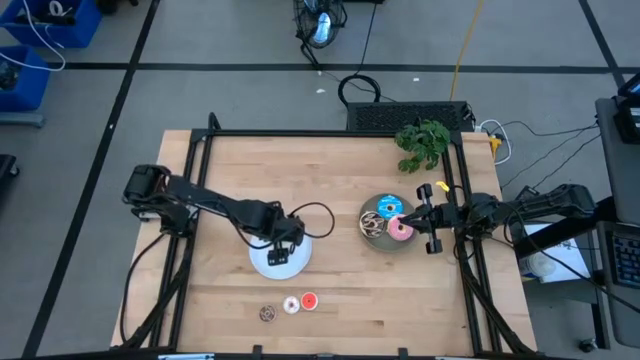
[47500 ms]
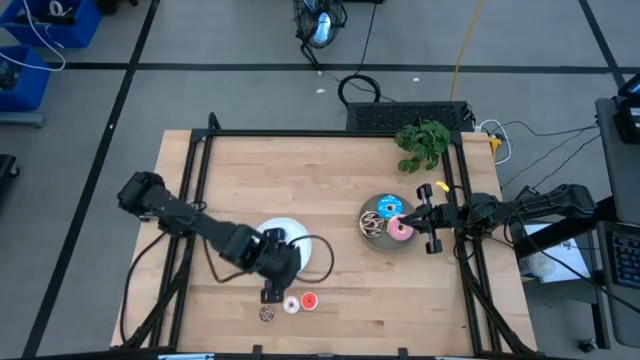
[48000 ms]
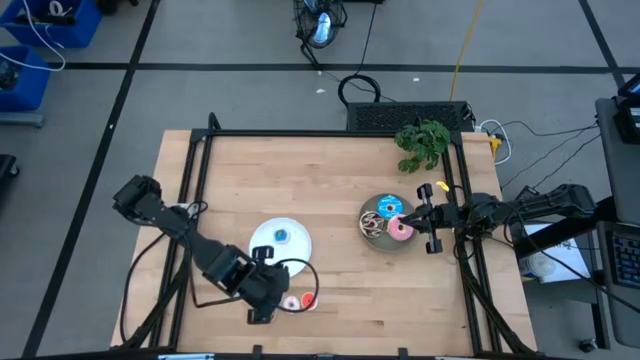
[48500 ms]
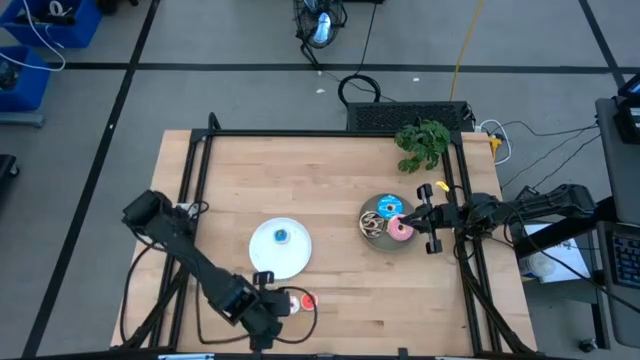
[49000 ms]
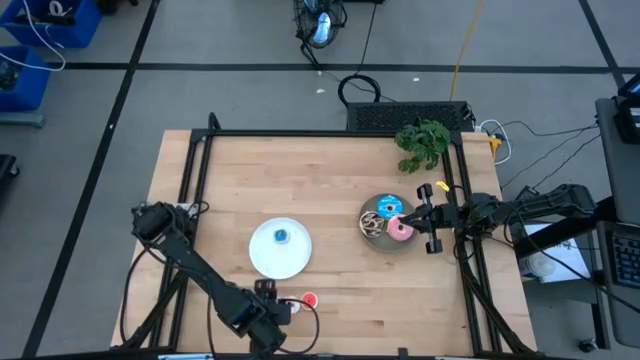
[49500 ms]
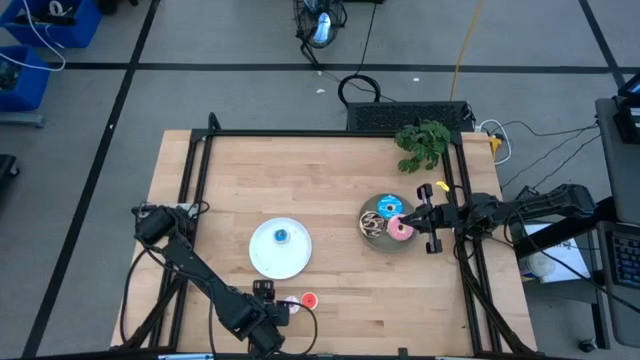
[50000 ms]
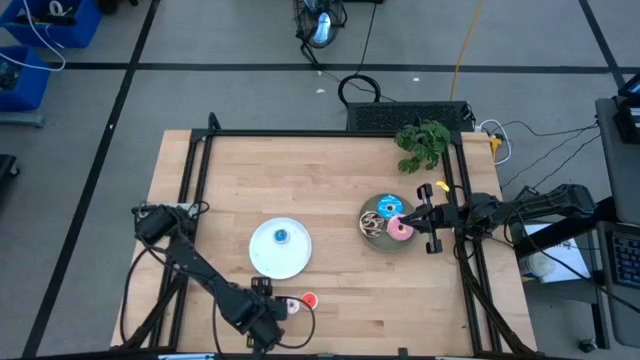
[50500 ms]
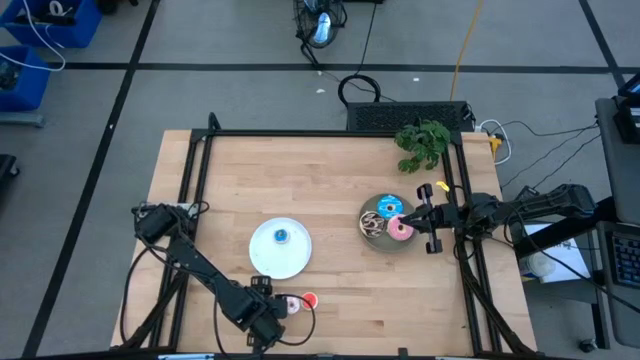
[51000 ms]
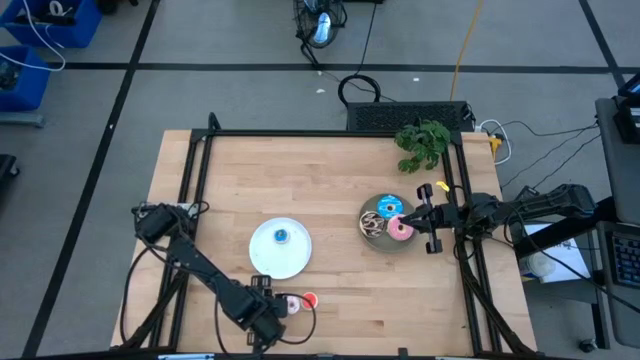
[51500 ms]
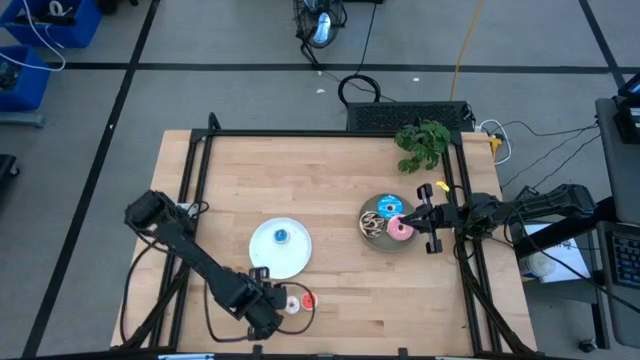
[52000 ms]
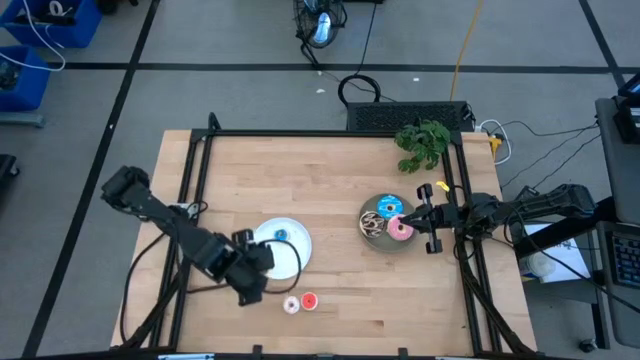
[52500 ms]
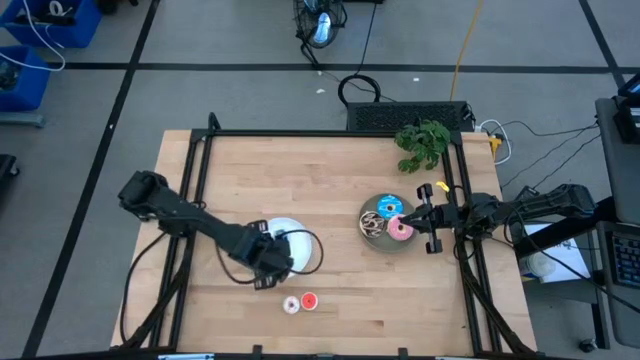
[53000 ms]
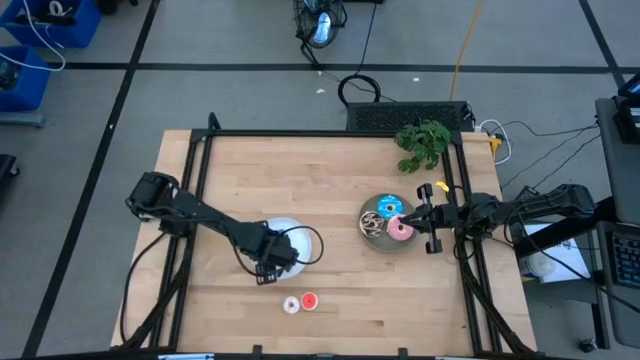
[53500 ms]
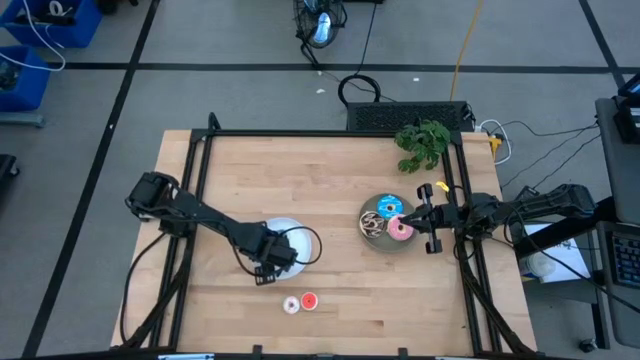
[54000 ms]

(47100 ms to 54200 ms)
Task: Pick & Place donuts
Put the small brown donut on the white plate

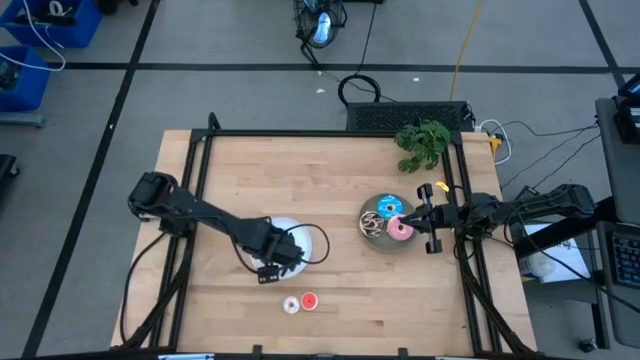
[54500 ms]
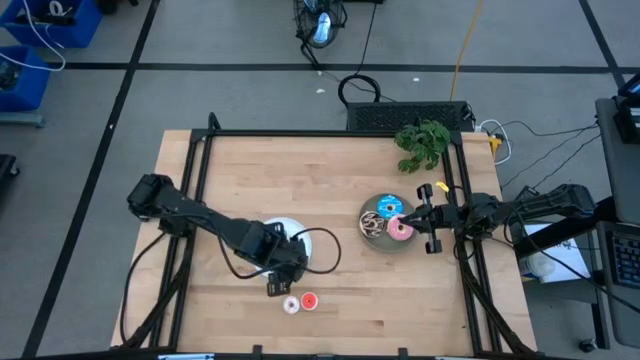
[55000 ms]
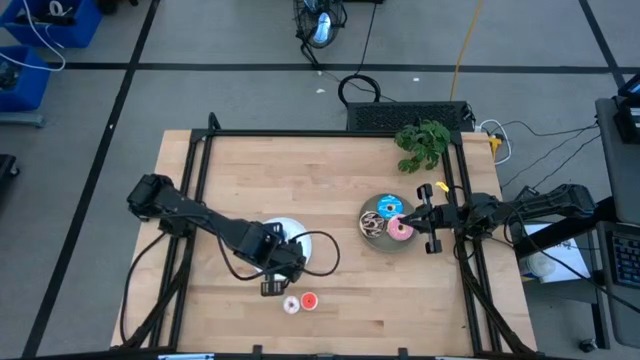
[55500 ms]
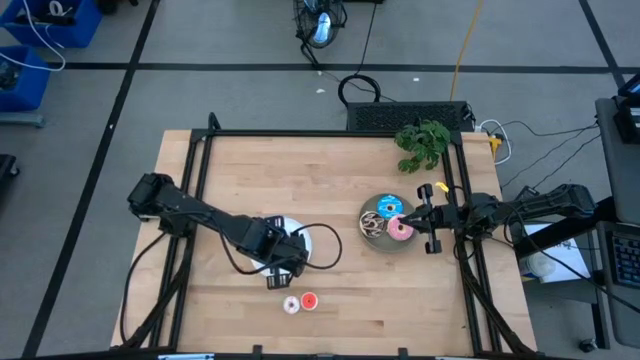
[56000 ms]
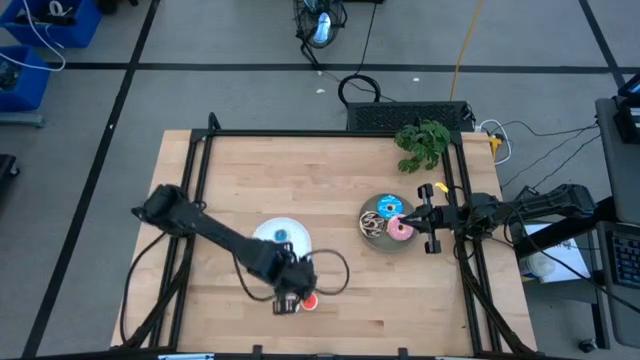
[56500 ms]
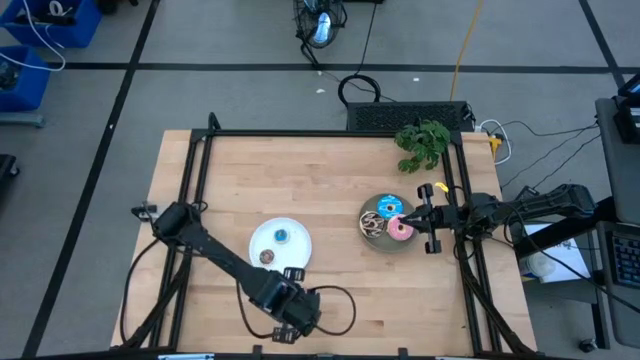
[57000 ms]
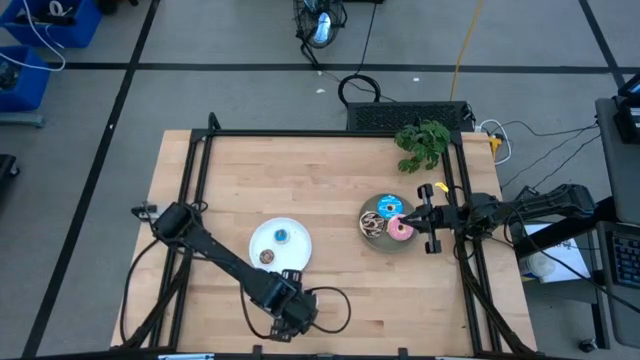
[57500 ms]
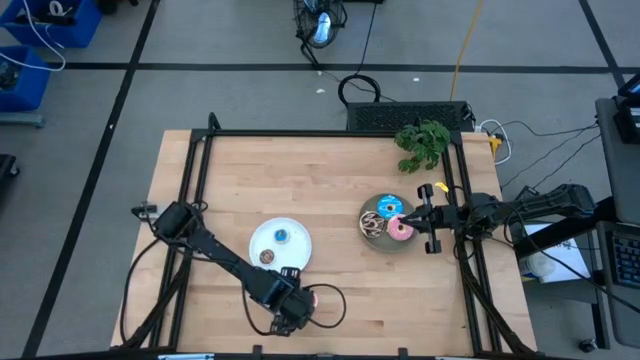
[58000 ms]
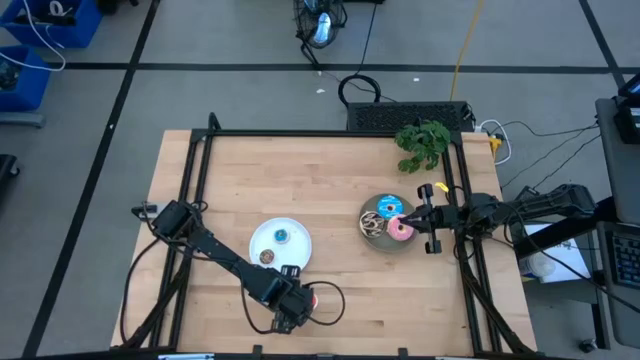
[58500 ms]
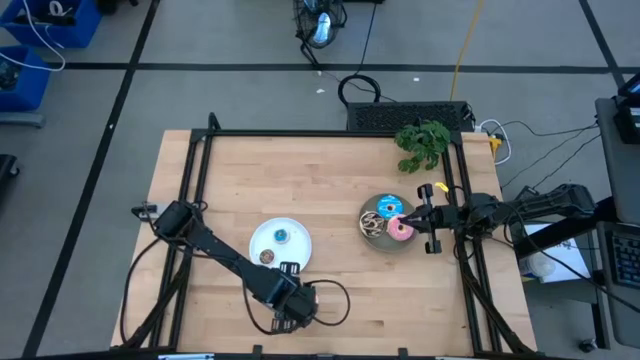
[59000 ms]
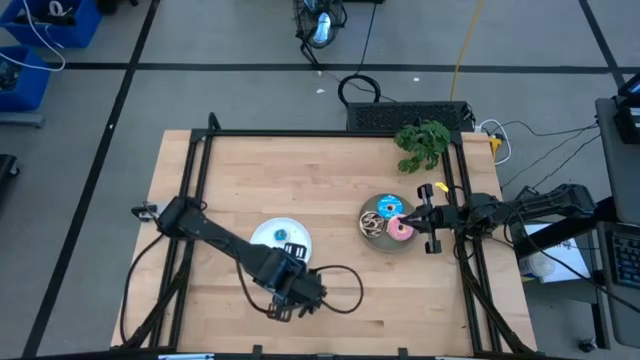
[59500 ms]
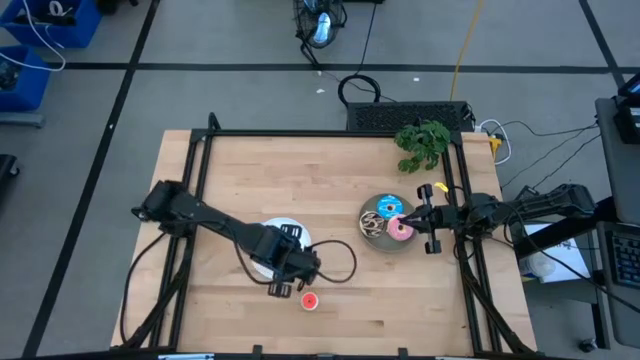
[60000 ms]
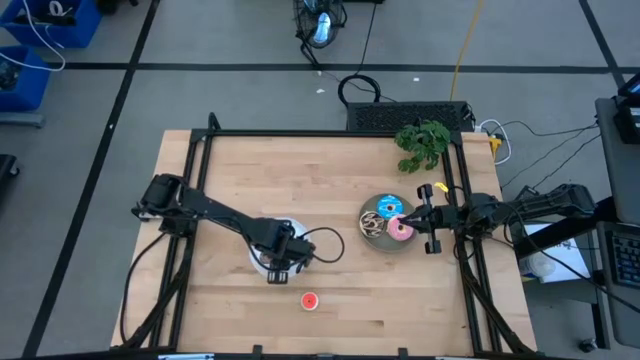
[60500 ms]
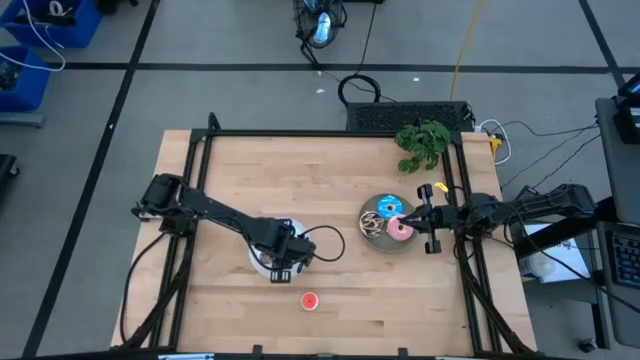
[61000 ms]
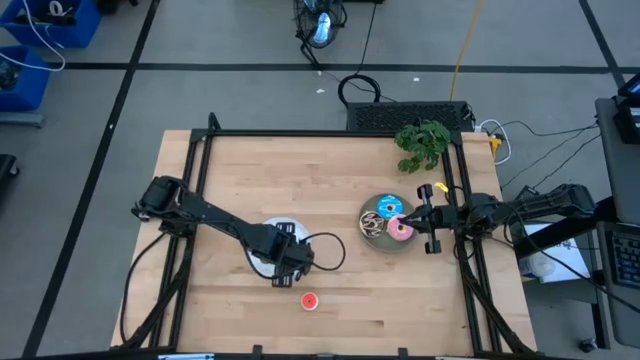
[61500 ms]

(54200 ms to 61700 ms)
Put the small white donut on the white plate

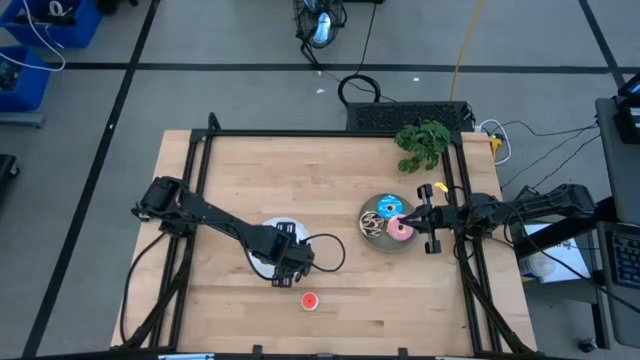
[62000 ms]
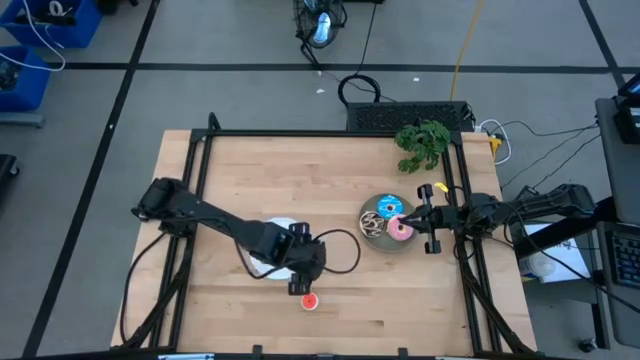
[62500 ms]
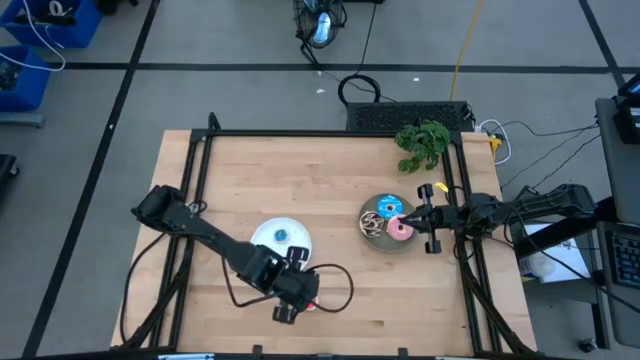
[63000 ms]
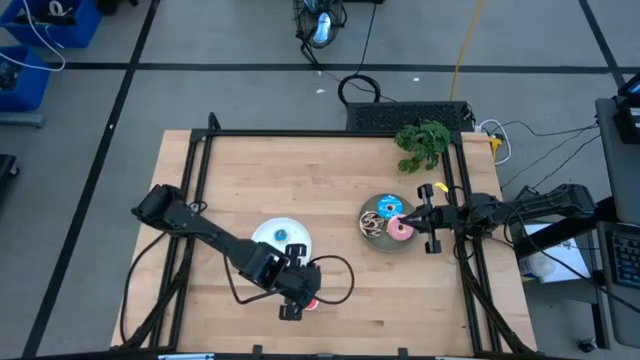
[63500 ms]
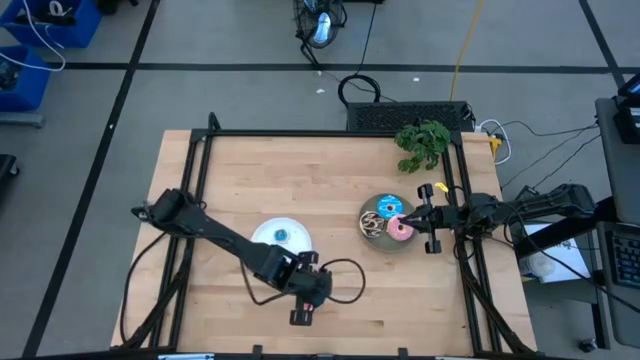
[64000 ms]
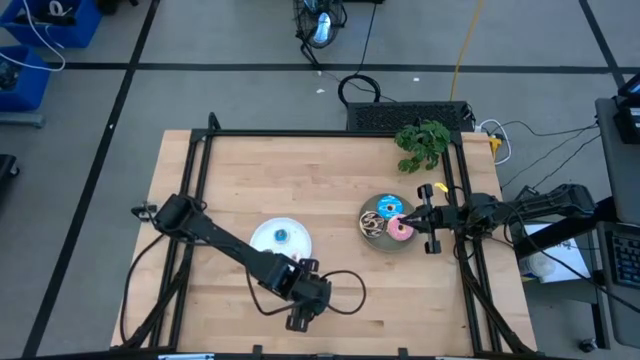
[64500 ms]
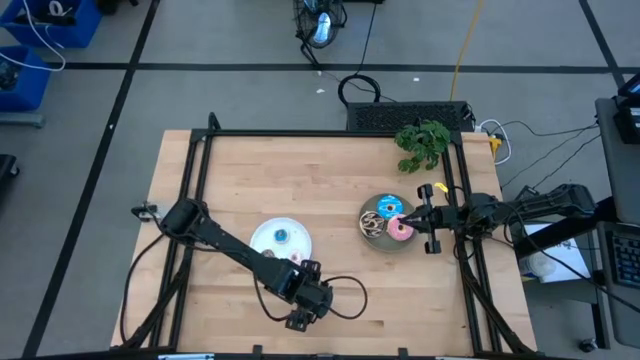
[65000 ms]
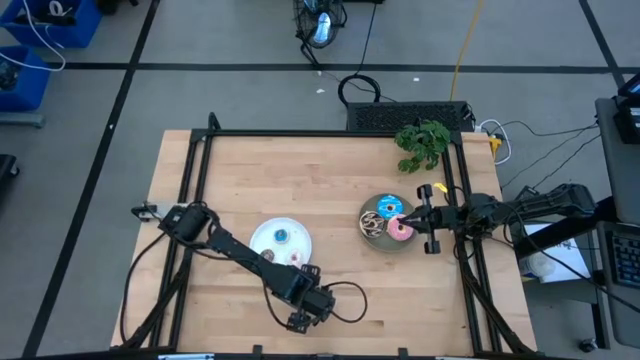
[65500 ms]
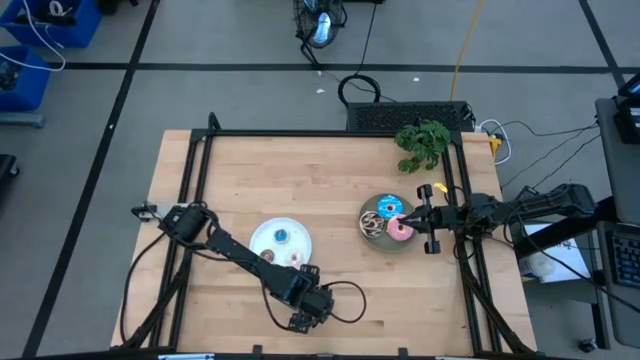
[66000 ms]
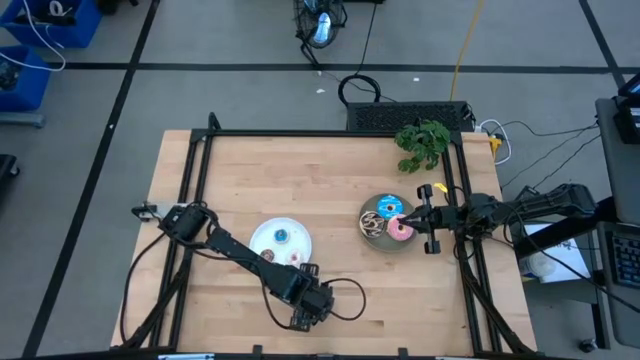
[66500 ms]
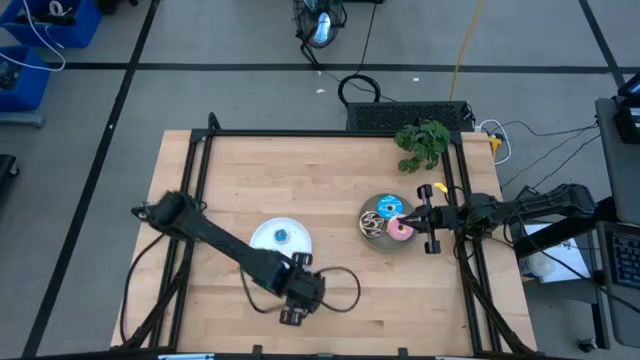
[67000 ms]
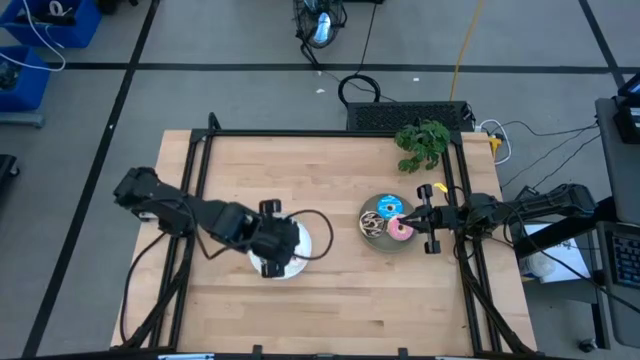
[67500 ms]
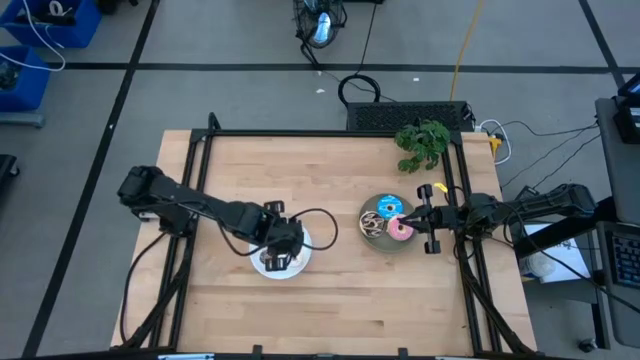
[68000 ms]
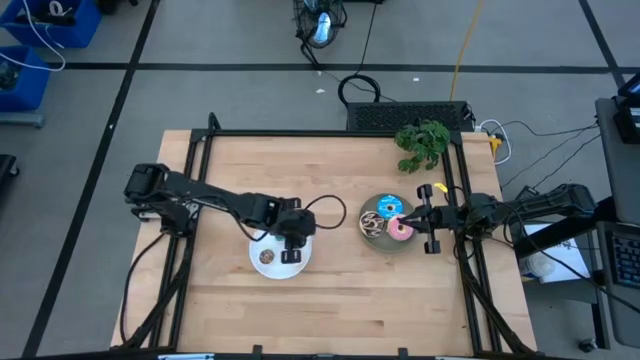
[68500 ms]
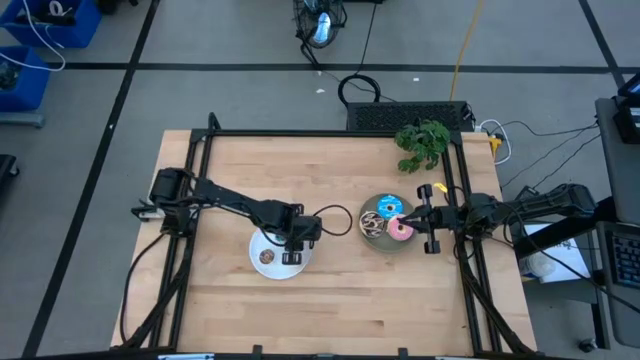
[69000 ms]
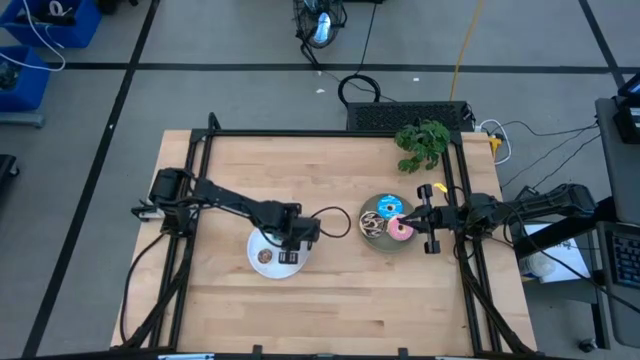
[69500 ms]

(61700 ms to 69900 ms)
Put the small orange donut on the white plate
